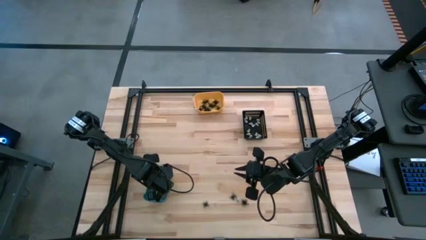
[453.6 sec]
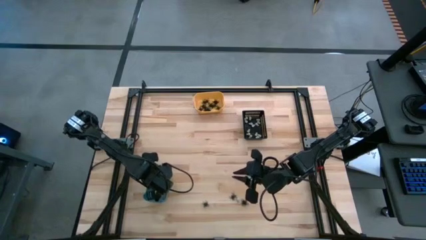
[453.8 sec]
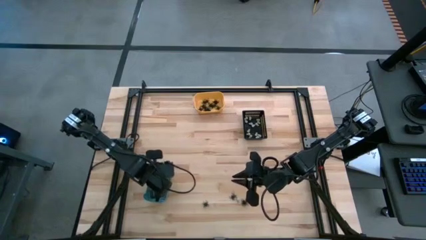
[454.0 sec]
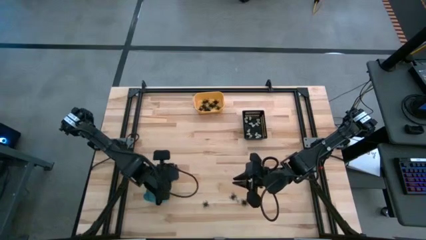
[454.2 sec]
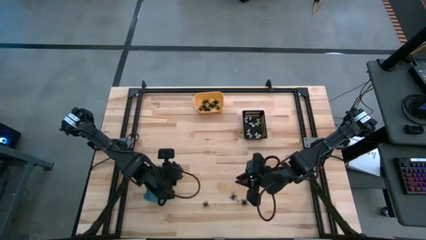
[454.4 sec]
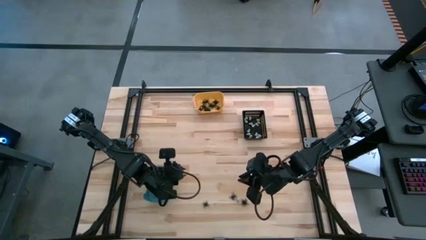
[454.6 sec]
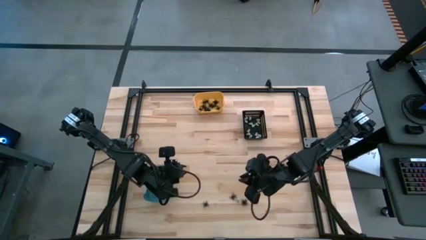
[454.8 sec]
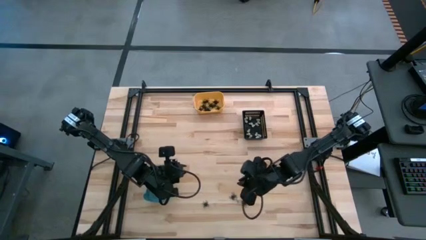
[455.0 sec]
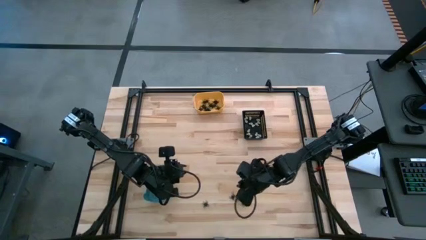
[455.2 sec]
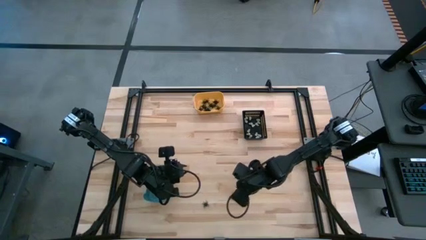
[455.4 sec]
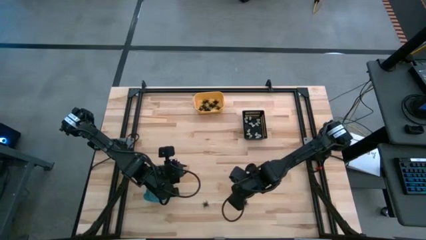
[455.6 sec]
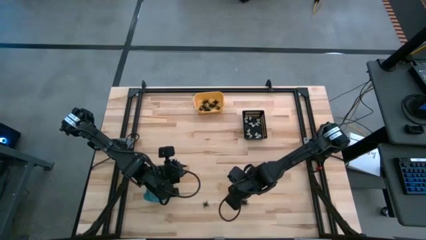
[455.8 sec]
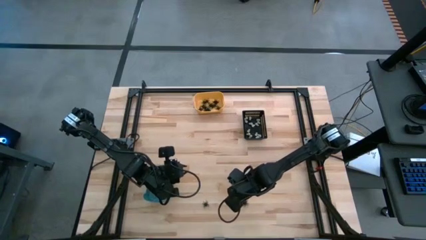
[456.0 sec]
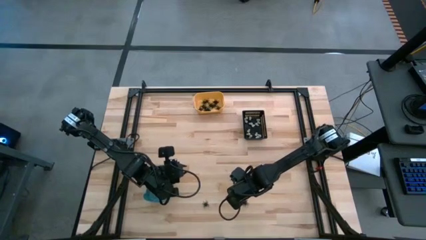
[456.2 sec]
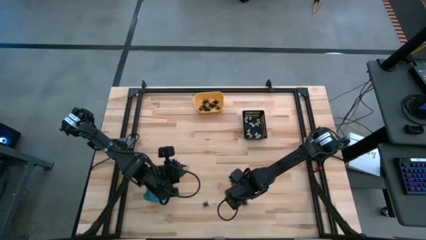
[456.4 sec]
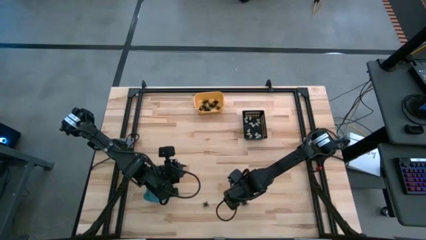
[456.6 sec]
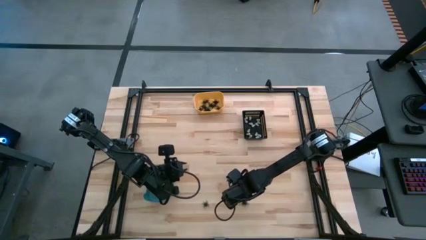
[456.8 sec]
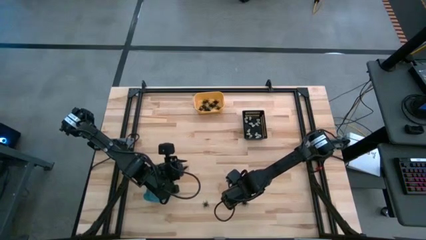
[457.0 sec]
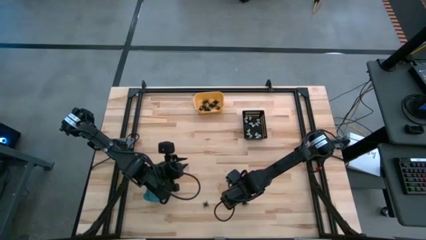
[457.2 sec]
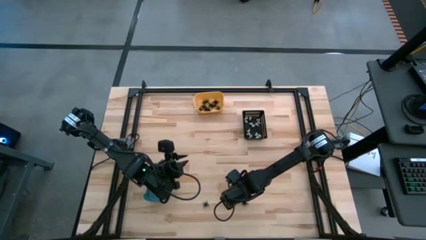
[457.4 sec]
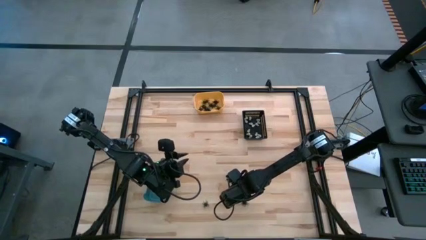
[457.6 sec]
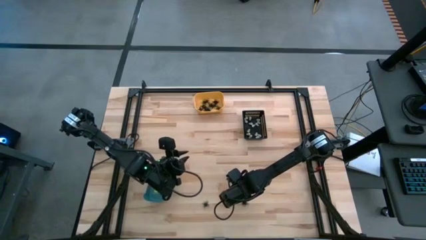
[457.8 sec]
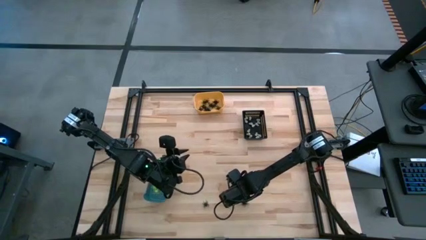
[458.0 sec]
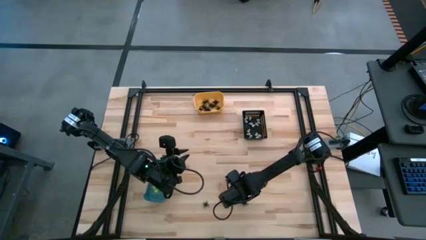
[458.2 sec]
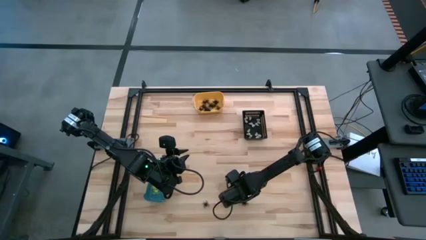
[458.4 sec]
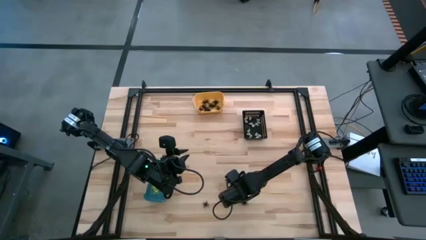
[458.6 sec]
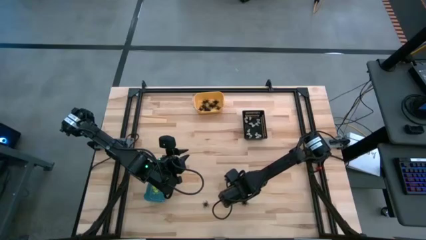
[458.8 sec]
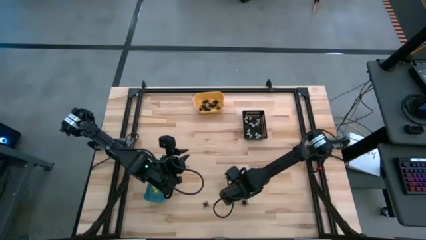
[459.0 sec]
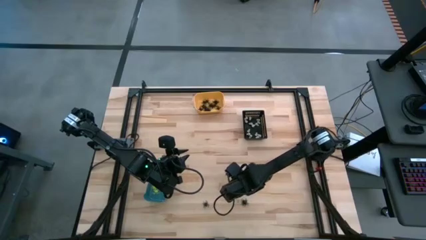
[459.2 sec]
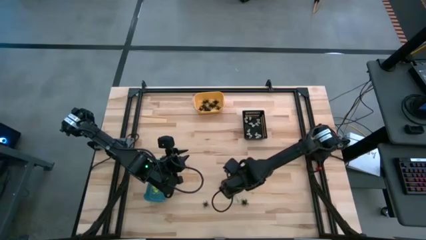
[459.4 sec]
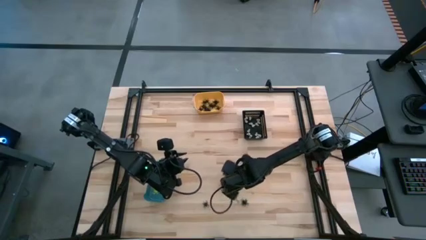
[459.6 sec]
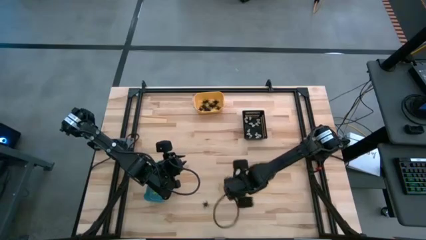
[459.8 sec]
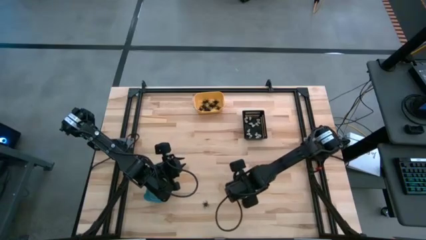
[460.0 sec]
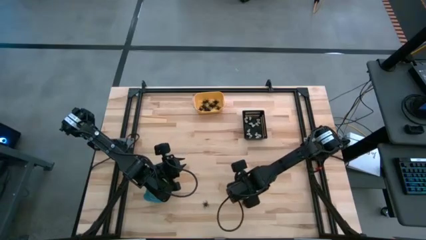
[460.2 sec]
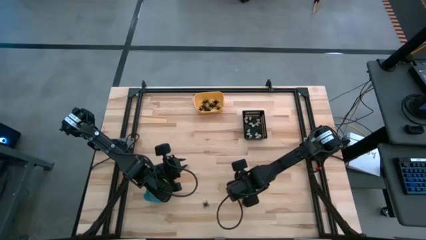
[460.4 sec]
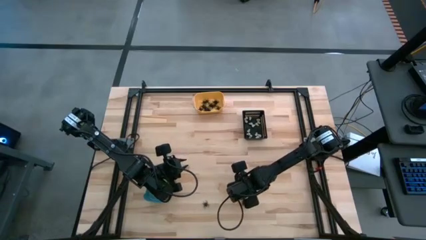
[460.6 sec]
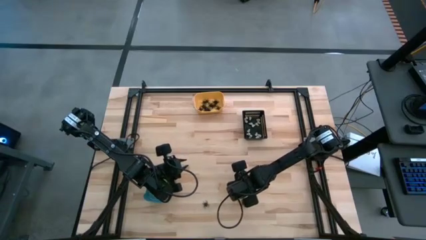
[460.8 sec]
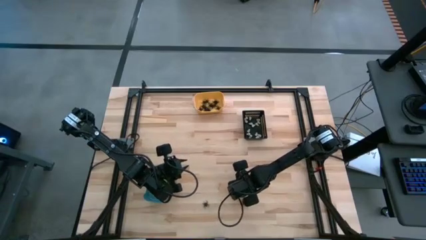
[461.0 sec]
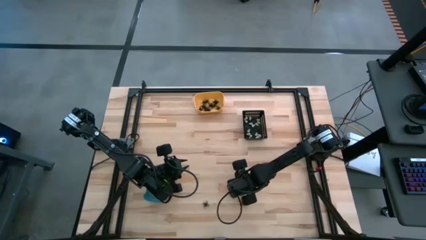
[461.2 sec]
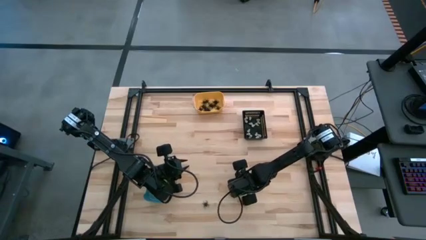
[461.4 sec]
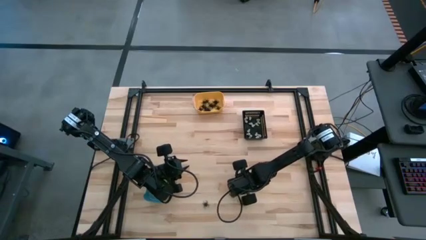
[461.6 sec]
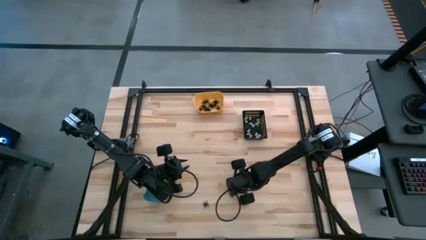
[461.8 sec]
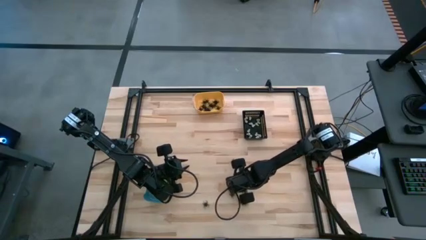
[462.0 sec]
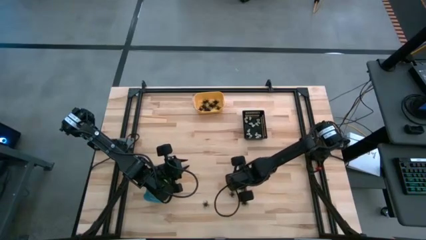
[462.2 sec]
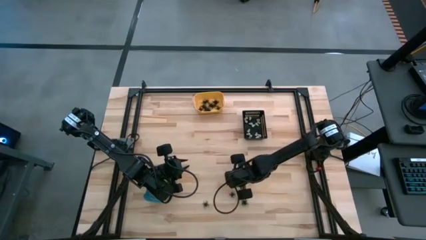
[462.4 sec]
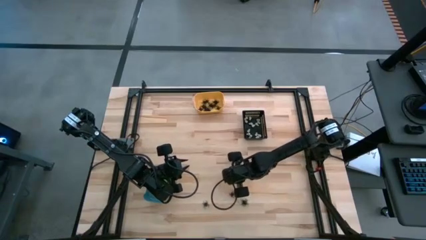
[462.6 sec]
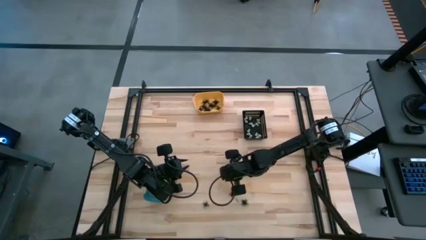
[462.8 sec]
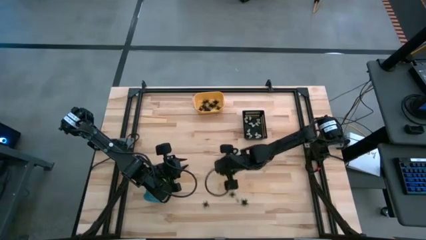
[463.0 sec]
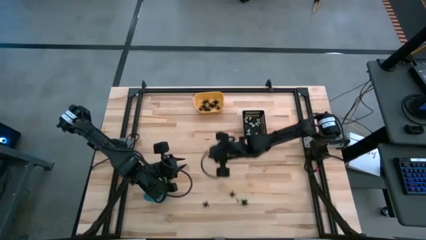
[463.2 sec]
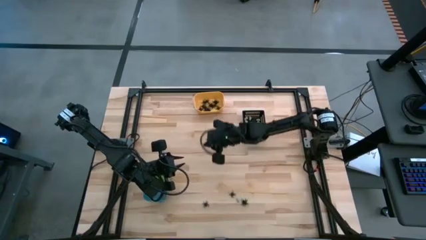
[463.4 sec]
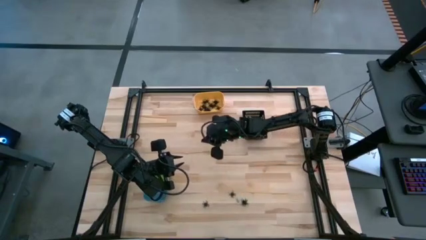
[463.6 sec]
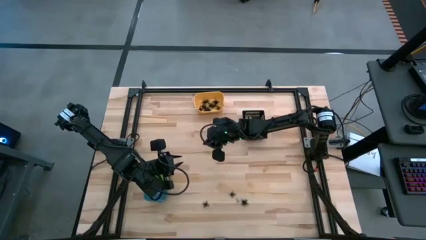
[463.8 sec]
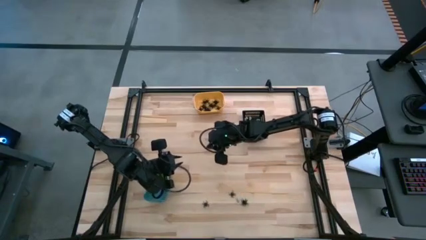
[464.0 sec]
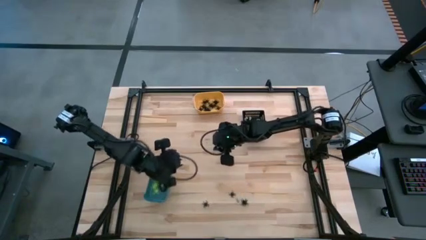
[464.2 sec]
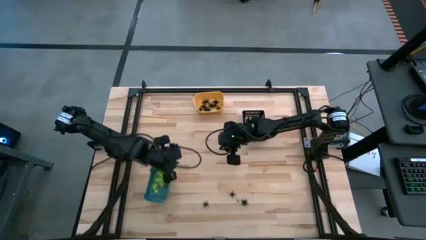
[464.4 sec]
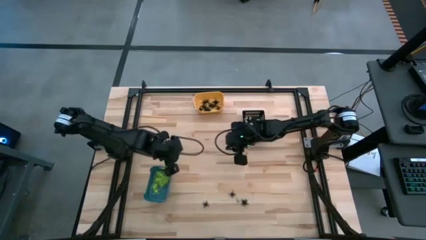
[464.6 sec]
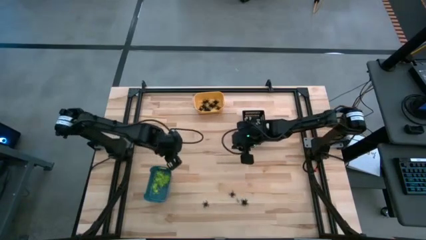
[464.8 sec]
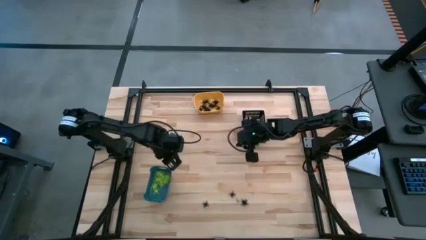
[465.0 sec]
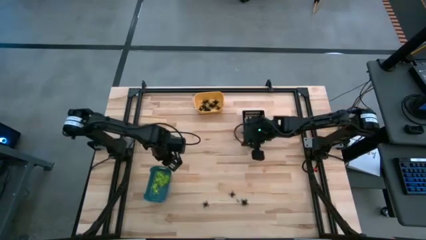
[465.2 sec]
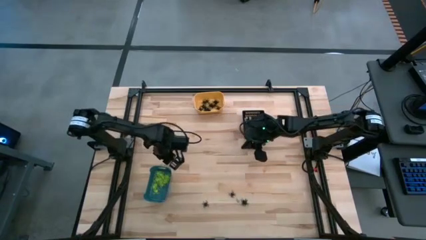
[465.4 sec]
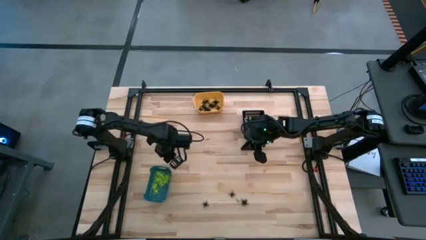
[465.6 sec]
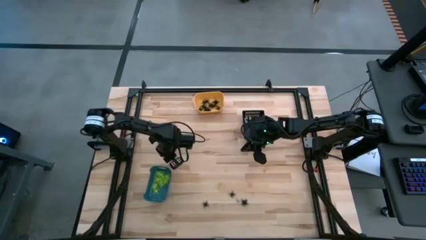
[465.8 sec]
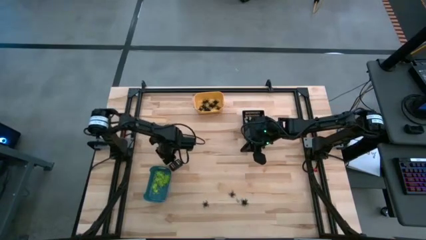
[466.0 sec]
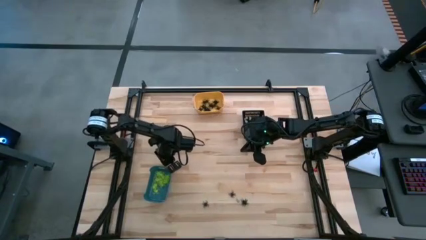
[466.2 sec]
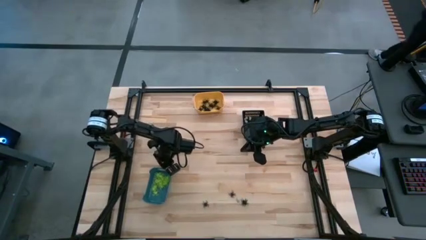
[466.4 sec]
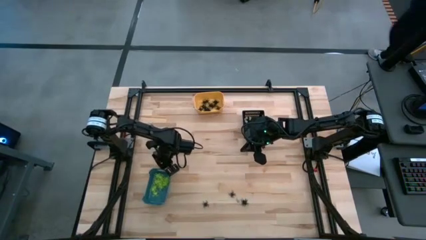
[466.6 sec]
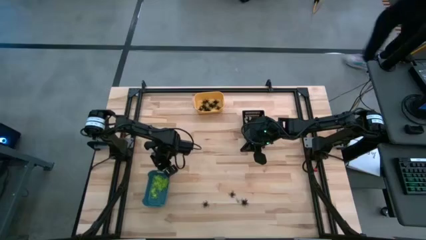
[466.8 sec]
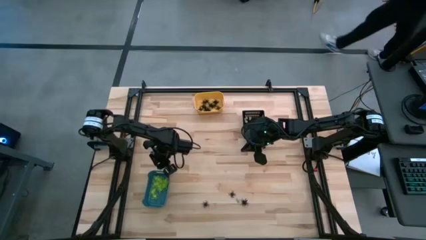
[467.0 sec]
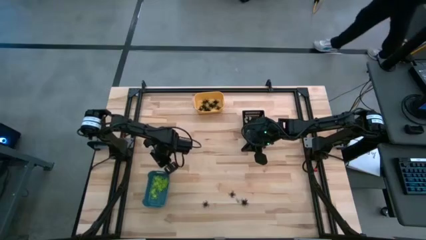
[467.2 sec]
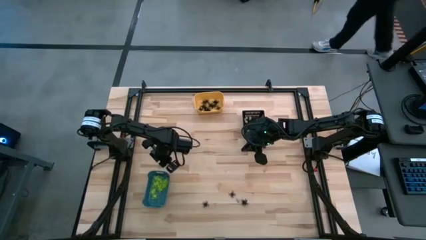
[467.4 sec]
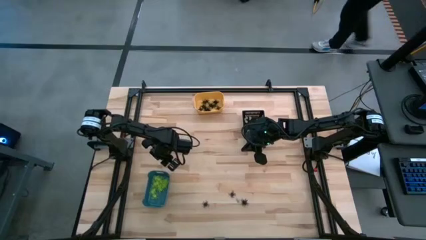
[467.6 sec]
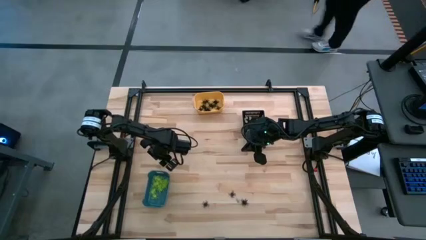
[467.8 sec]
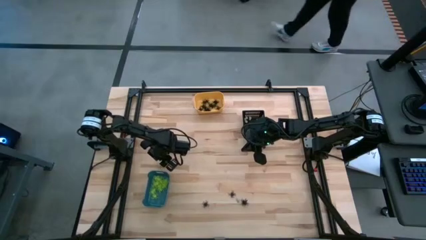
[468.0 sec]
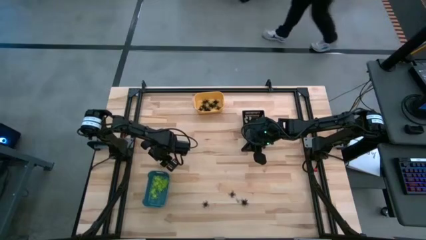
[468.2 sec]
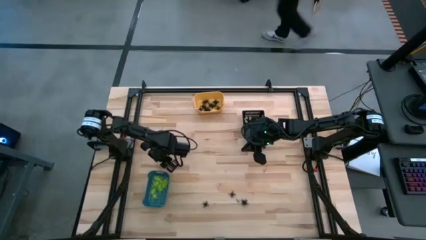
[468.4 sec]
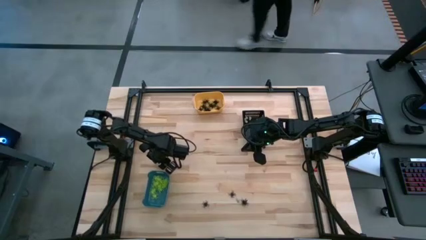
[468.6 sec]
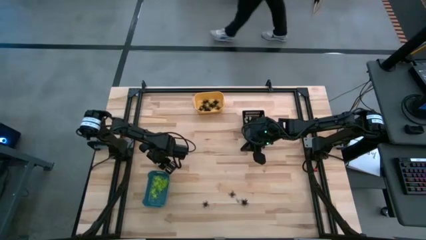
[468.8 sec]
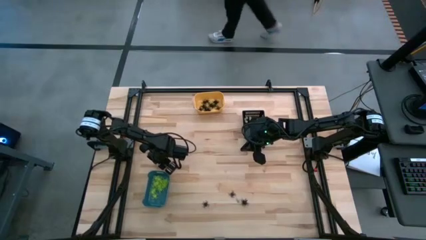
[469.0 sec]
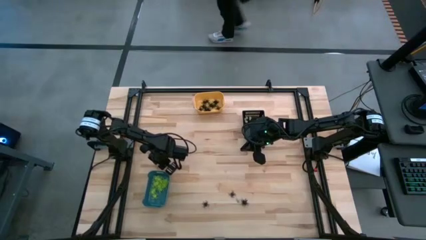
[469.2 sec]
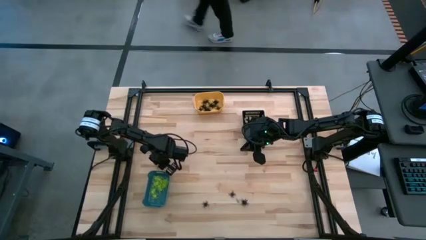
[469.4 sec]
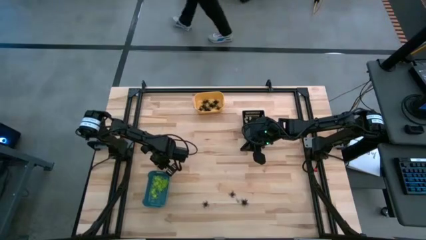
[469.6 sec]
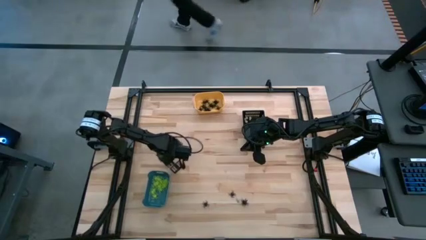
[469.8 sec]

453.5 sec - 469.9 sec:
Task: Sort Halloween decoration
Put the white skull toy into the black bin

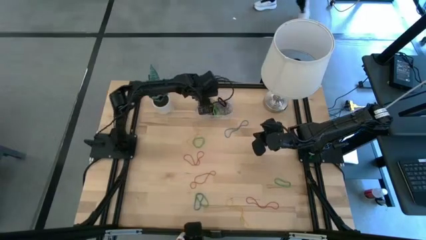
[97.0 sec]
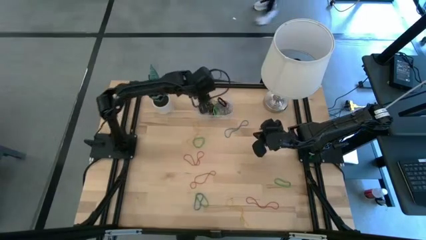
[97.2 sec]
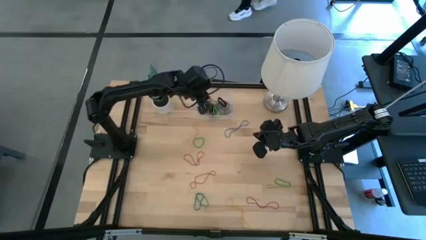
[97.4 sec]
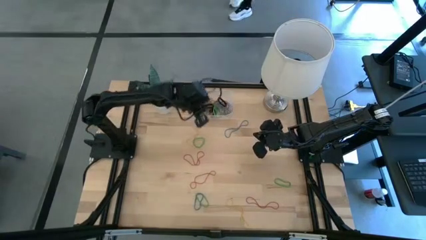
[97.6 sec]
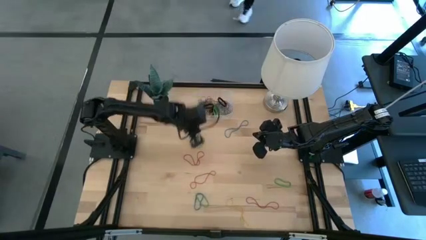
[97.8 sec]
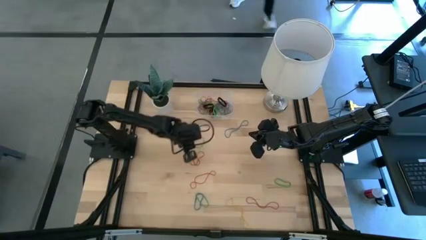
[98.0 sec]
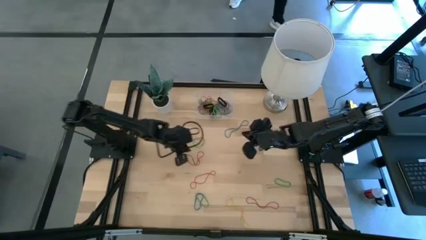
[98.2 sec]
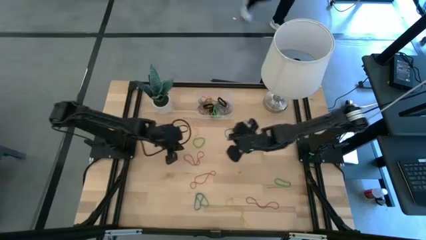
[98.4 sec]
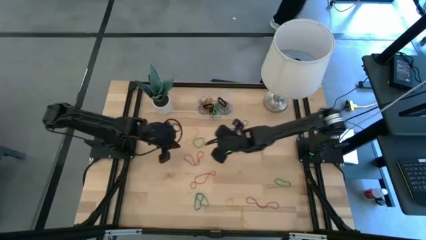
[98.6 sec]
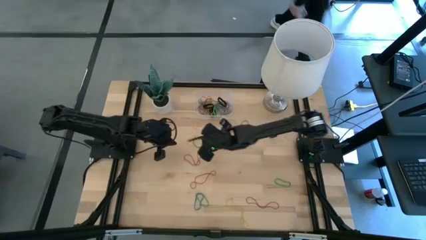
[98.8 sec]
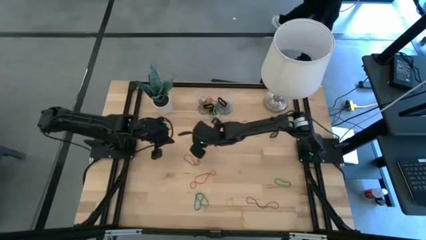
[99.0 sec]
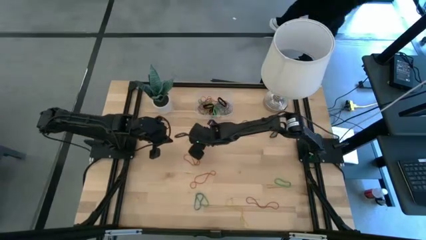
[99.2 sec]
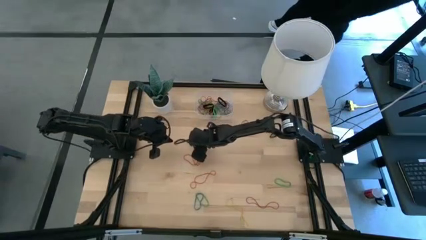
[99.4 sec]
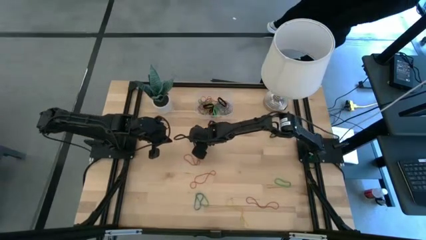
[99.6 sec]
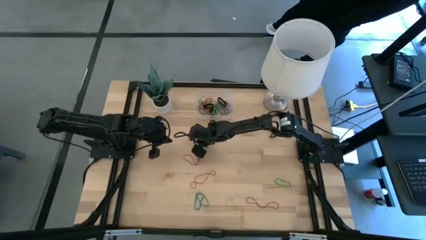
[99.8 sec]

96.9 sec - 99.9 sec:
Task: Pick and place rubber bands into bin
Put the green rubber band into the transparent bin
